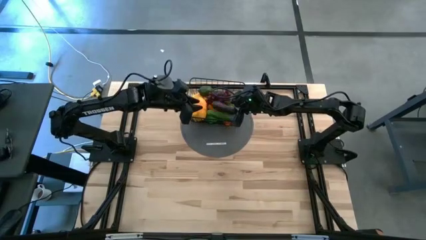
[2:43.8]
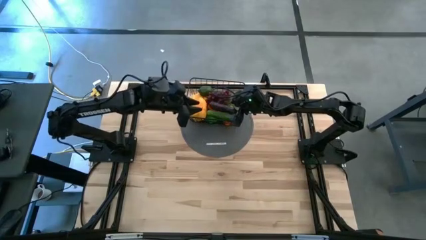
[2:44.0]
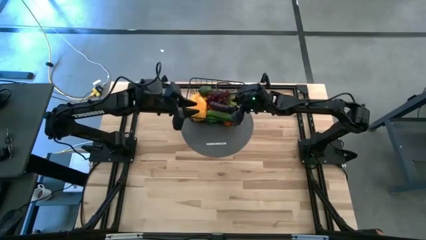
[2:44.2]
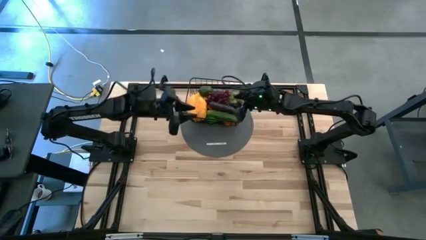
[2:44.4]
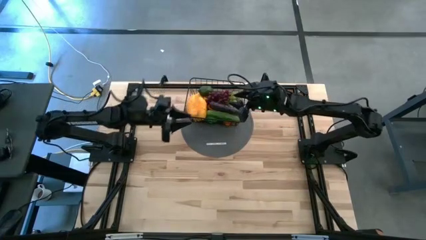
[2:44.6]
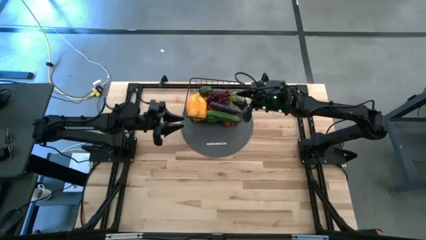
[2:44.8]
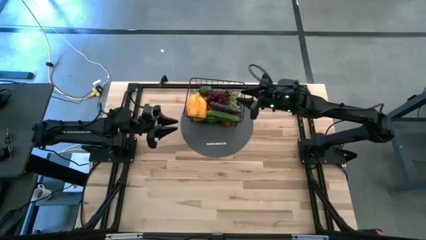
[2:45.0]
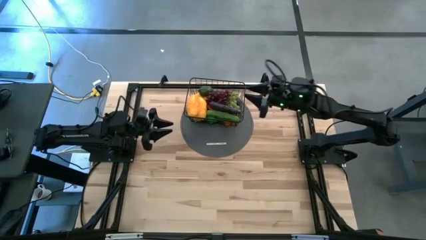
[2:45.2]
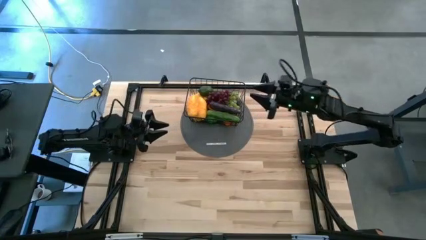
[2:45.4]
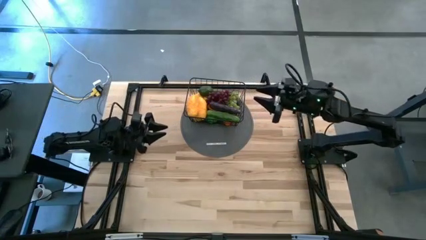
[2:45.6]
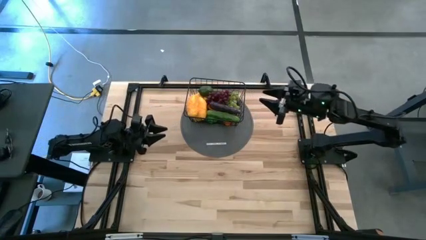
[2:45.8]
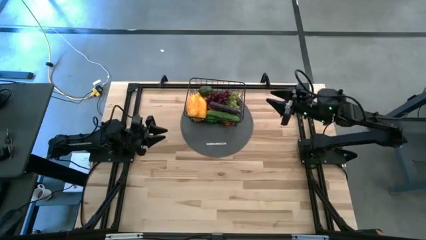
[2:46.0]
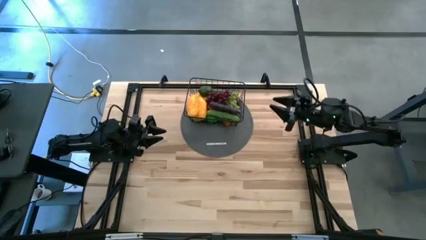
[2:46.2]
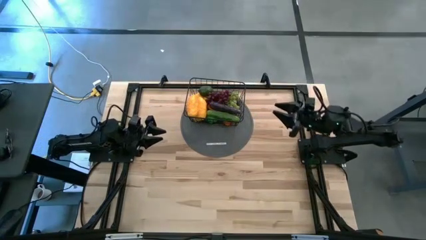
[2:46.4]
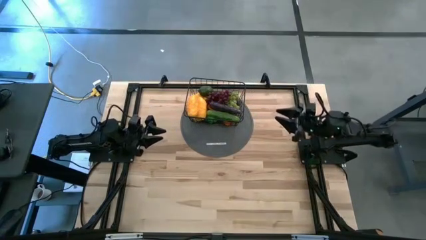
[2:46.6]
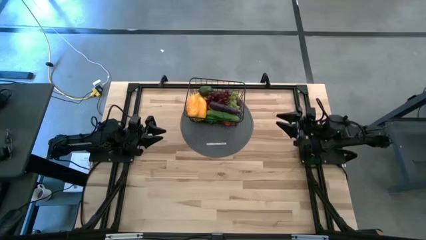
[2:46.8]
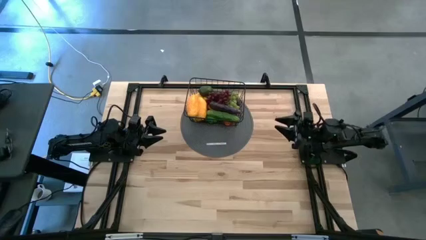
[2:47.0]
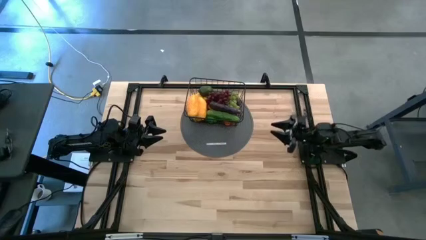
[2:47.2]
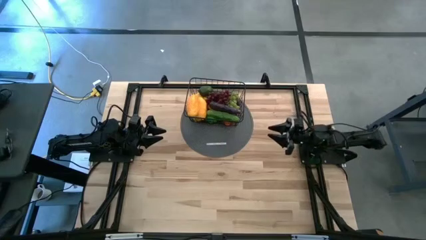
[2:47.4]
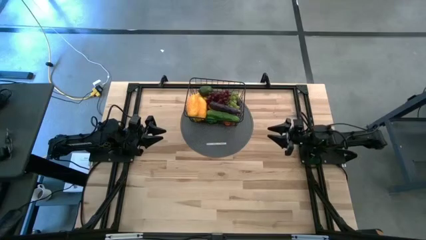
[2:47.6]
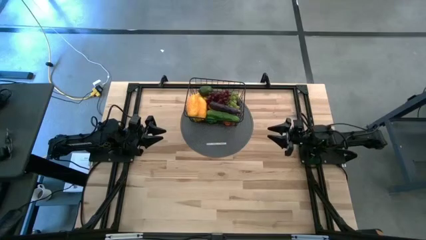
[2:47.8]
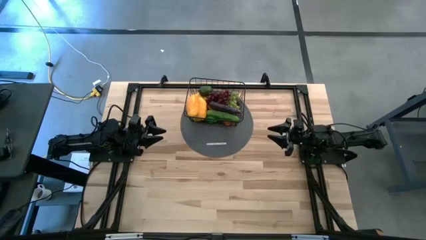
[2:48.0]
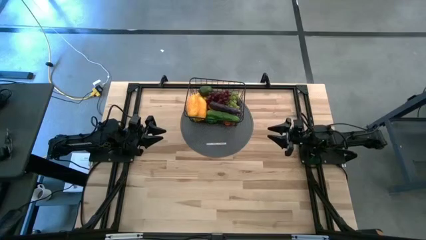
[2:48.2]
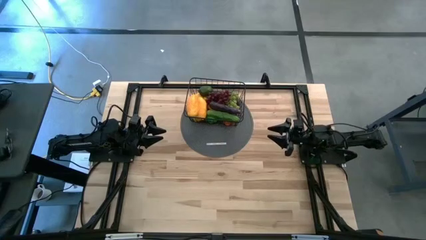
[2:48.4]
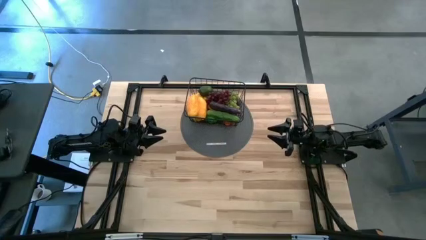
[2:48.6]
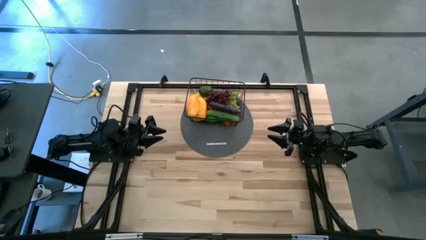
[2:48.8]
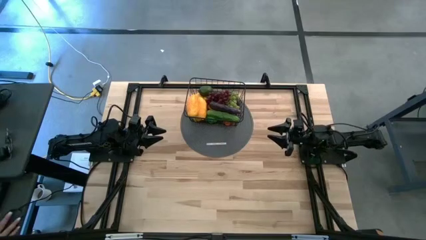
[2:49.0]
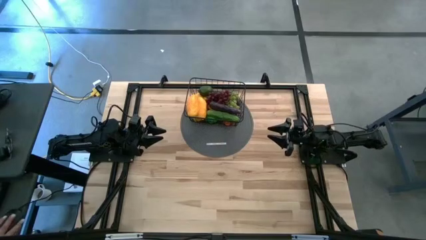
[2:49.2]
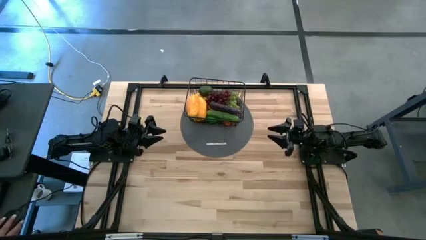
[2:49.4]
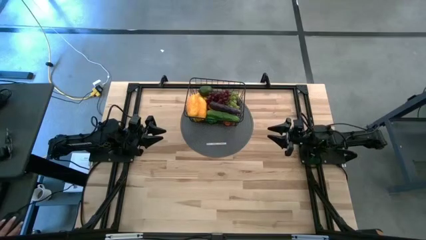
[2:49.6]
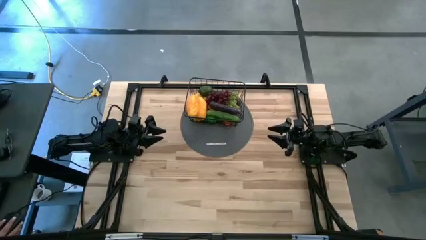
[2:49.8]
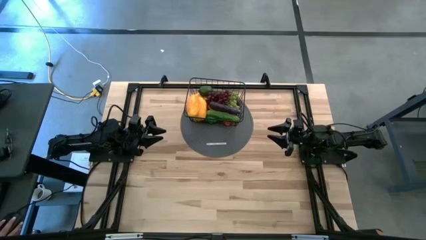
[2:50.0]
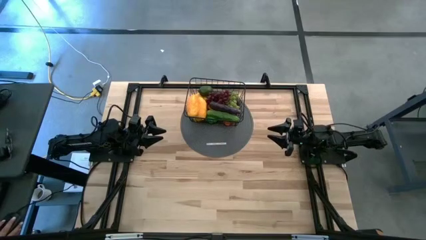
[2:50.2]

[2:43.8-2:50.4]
Task: Build produce basket
Return to Home Position

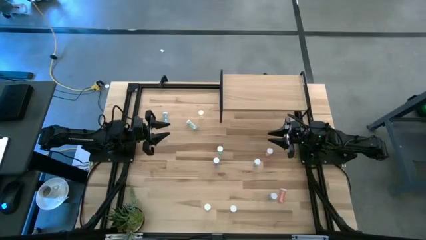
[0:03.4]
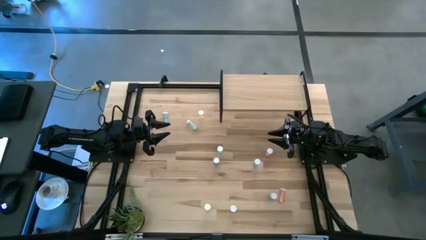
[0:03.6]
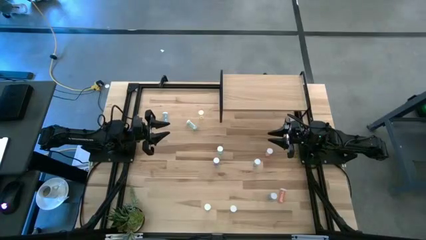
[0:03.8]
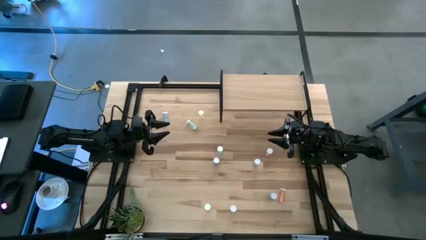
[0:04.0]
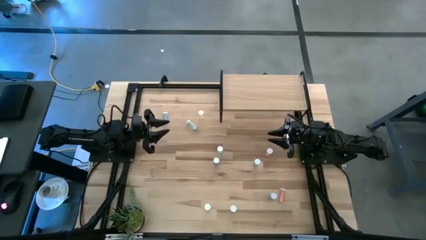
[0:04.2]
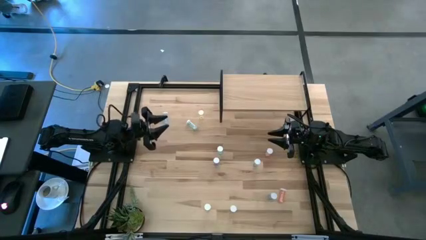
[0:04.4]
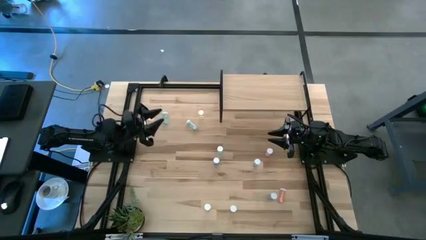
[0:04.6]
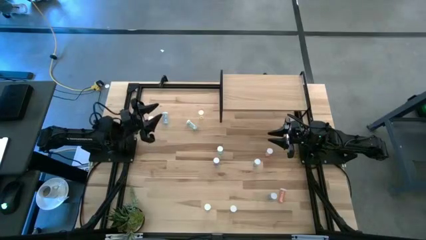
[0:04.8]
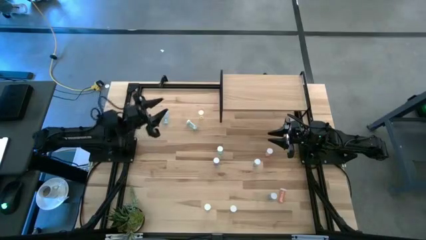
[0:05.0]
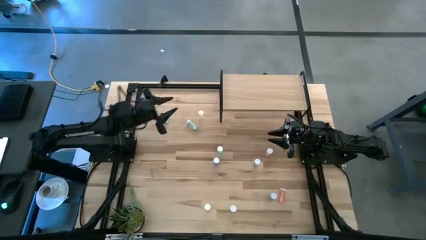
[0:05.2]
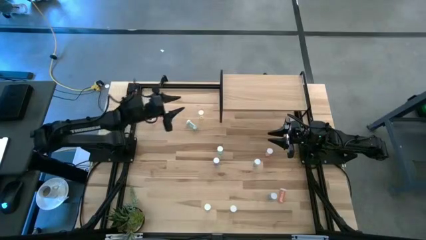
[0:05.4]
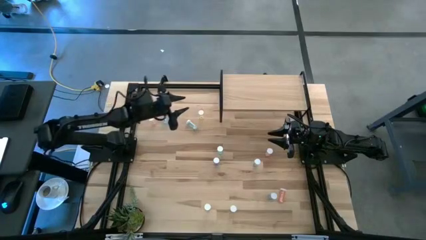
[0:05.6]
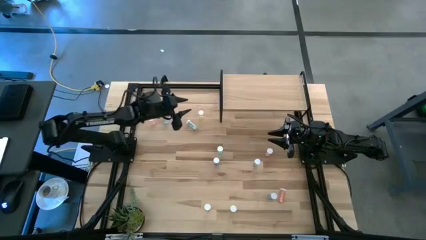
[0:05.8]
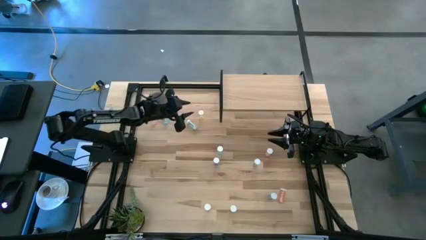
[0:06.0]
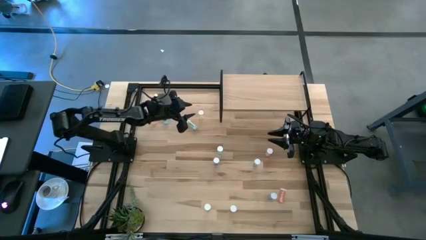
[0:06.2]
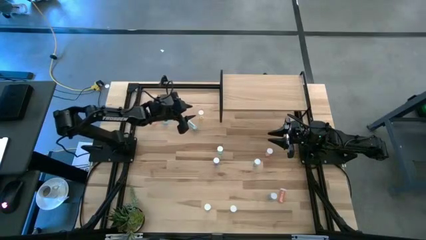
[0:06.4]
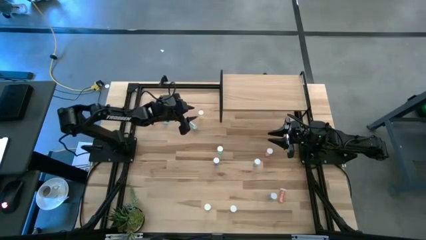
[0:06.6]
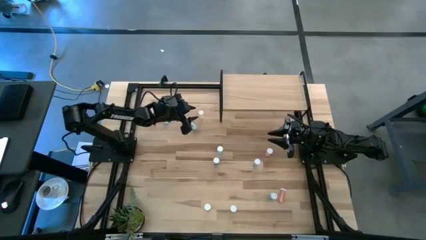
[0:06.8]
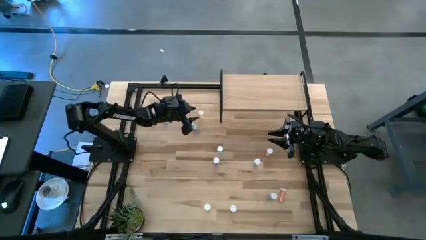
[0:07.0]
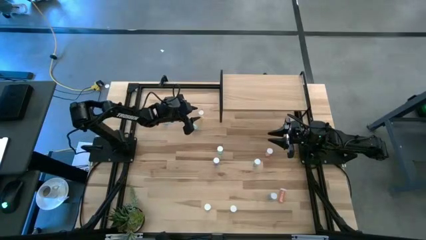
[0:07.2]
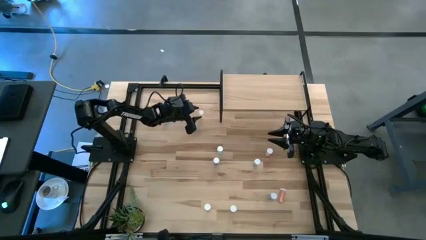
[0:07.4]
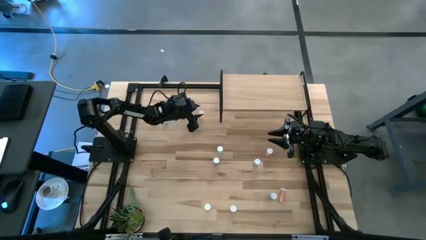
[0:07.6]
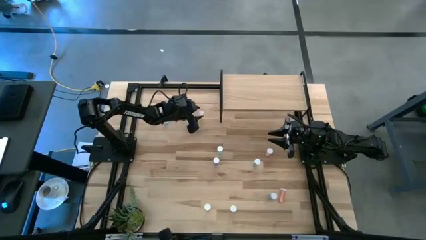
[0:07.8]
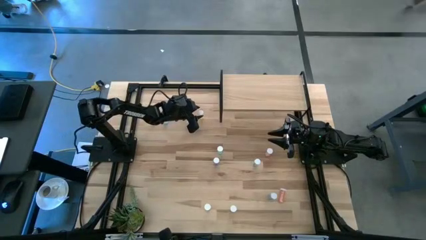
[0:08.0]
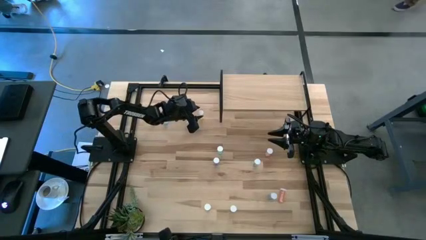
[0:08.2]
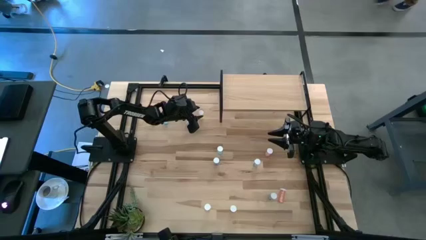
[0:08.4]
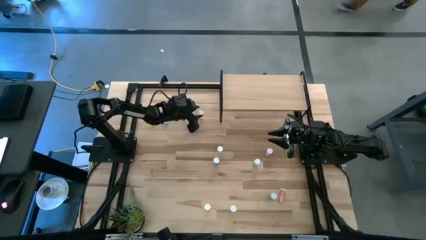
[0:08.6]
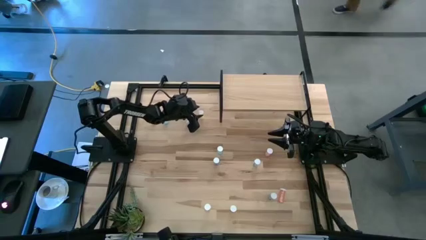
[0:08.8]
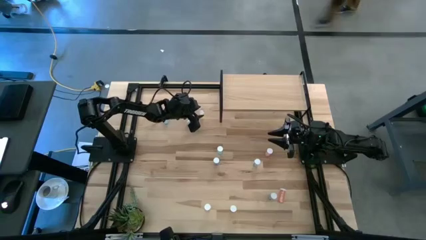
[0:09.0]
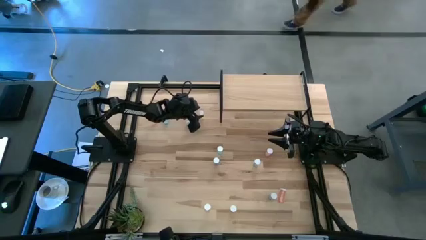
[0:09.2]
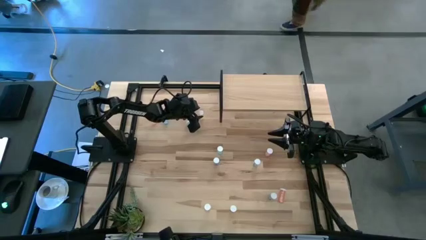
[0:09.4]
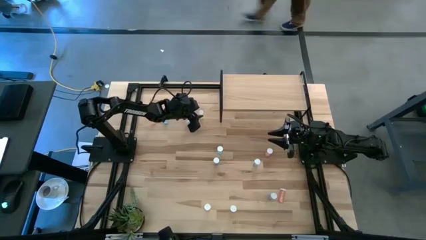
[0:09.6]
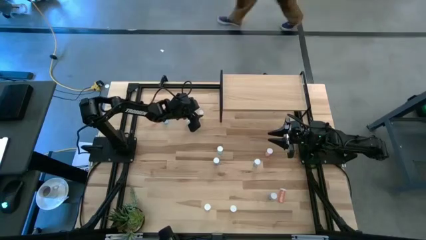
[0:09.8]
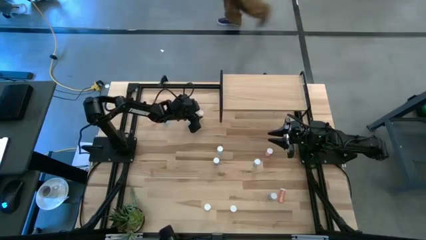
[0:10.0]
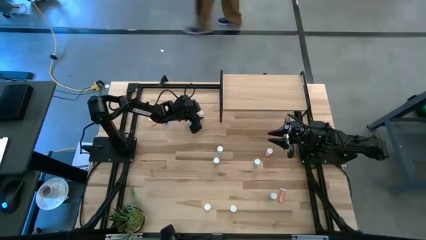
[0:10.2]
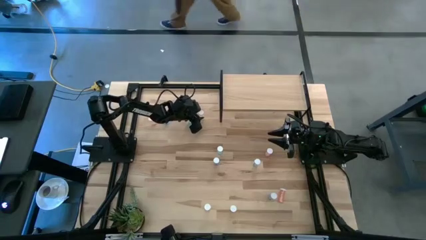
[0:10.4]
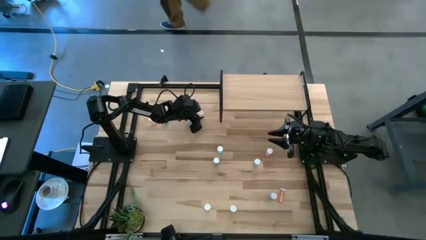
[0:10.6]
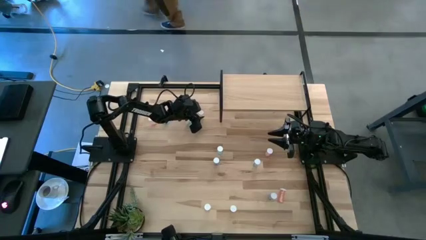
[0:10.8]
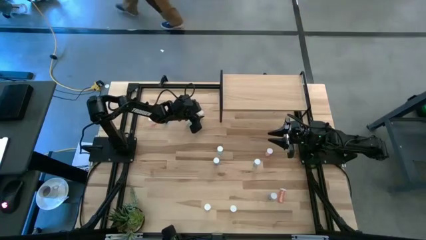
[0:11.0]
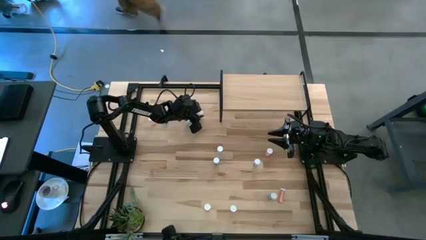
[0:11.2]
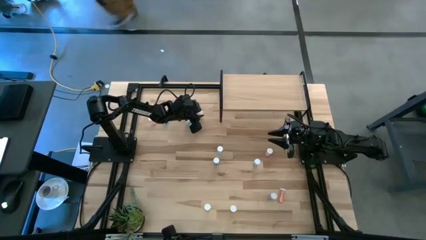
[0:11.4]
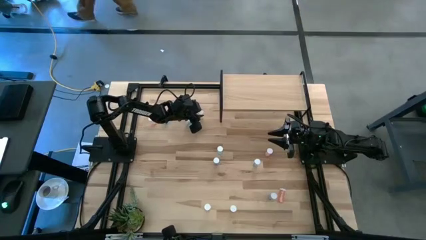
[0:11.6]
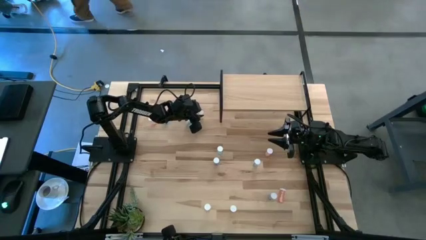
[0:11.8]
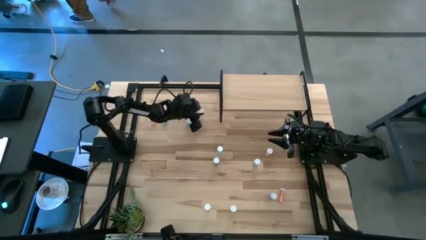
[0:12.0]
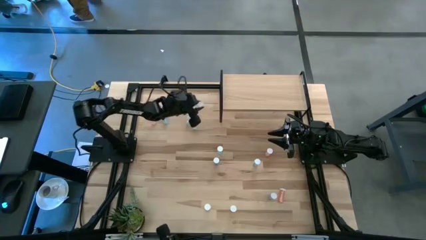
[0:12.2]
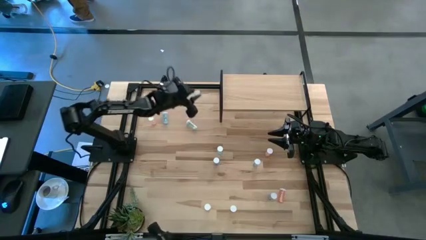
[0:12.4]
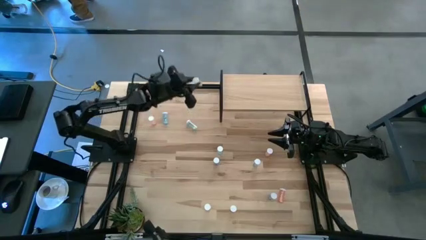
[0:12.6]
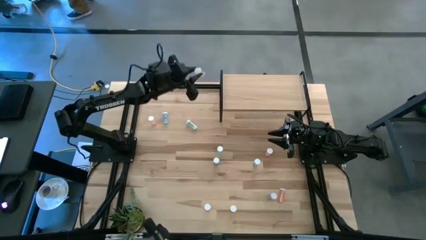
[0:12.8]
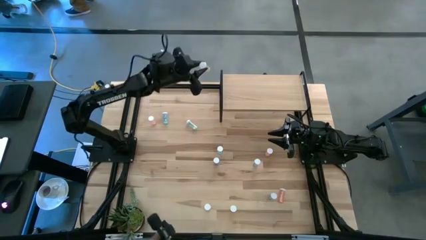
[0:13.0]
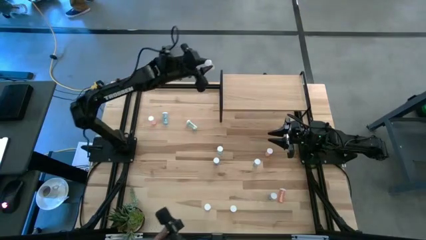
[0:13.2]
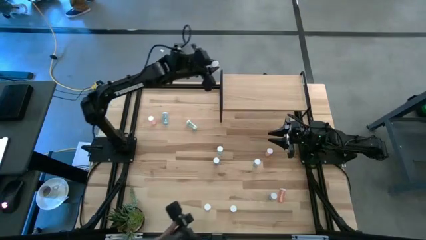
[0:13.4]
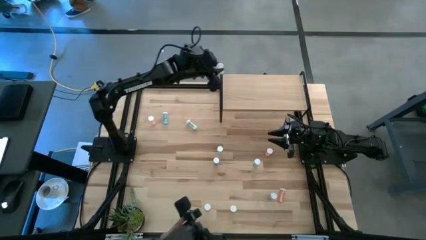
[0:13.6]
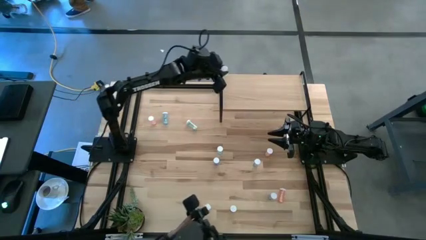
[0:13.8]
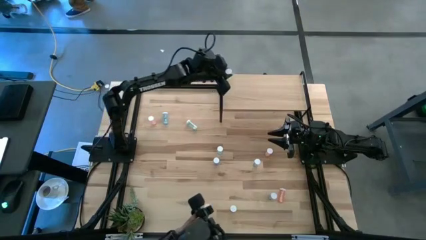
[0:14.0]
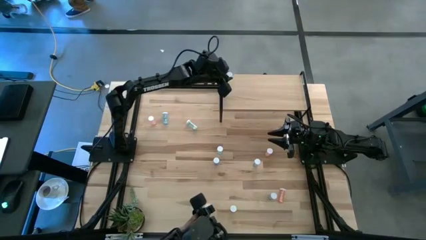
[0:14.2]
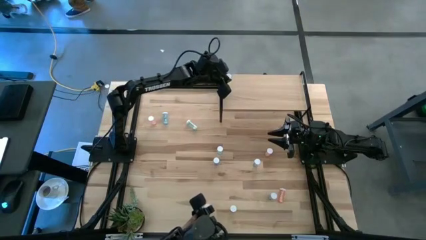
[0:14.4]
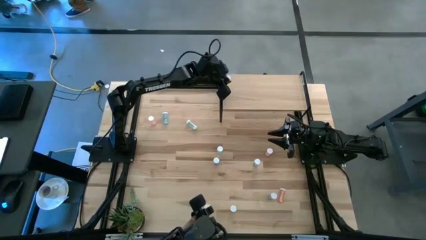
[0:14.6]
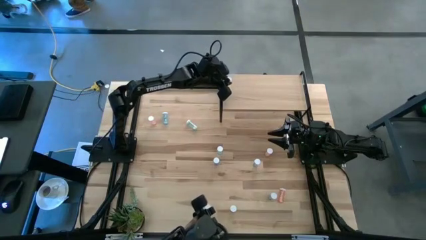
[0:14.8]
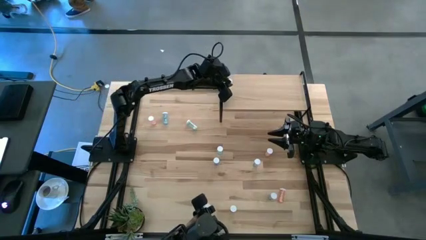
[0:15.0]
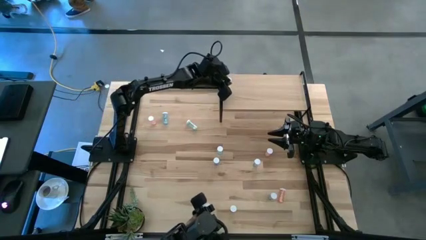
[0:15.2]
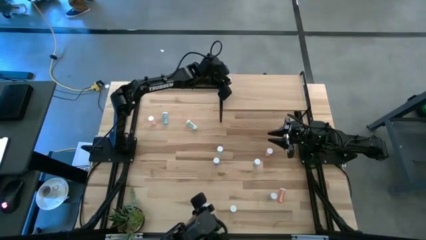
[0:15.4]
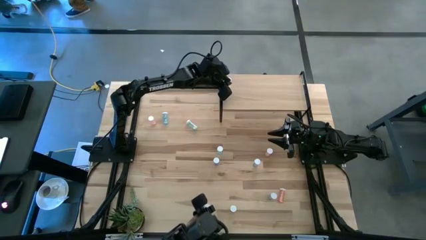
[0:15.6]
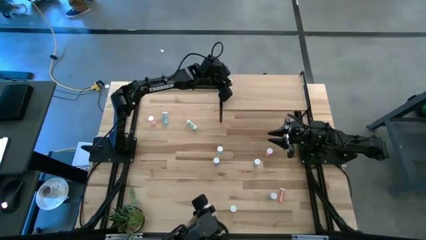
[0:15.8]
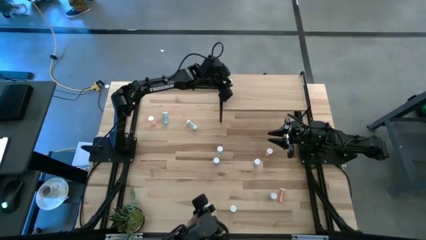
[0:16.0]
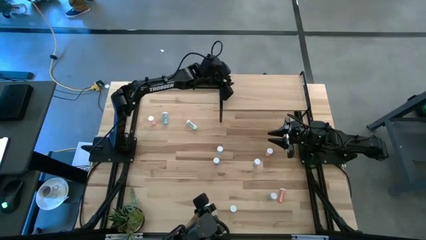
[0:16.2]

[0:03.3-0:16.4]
Task: Pick and place medicine bottles onto shelf by color
Put the top left yellow pill bottle on the shelf
